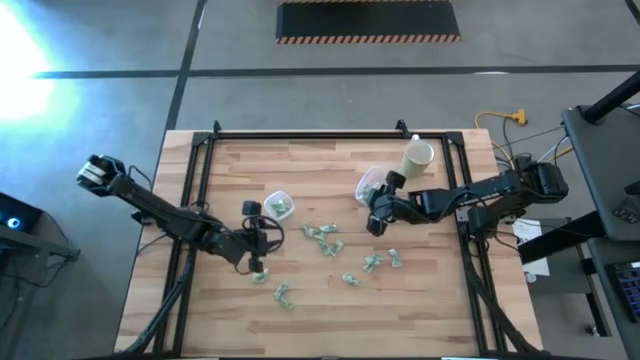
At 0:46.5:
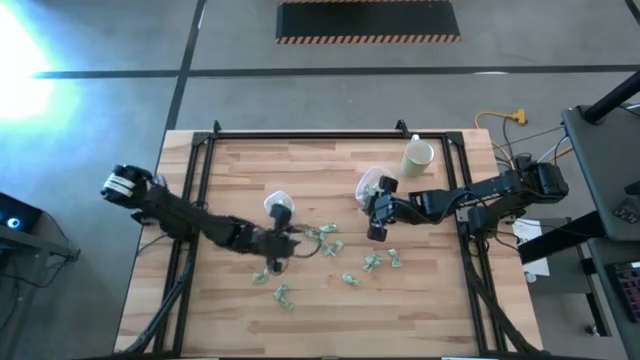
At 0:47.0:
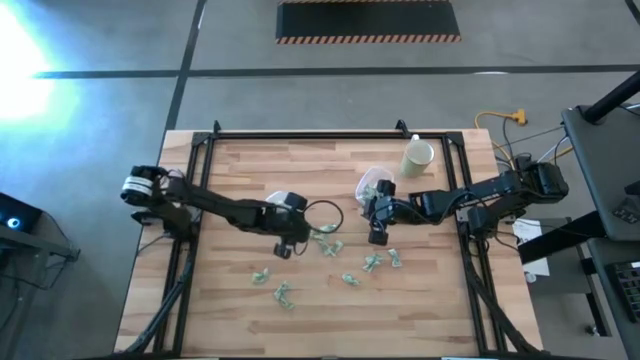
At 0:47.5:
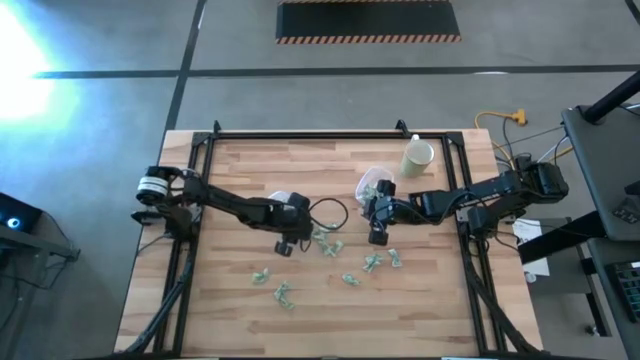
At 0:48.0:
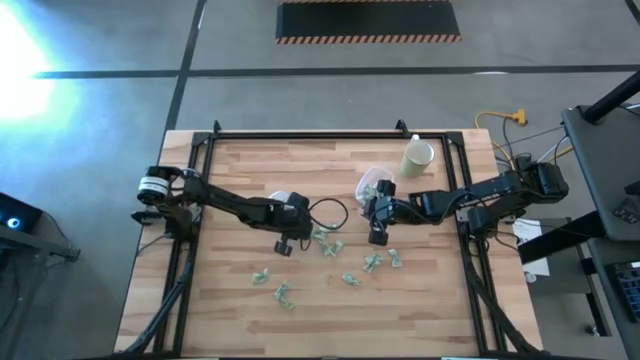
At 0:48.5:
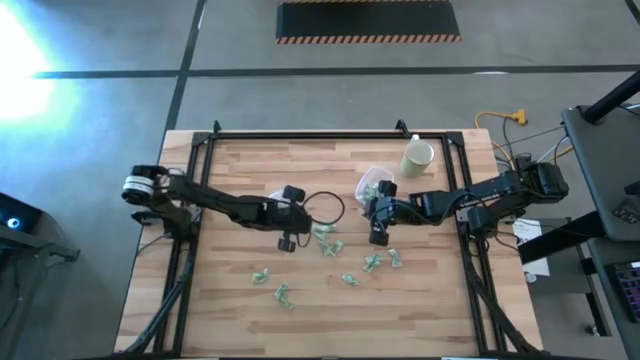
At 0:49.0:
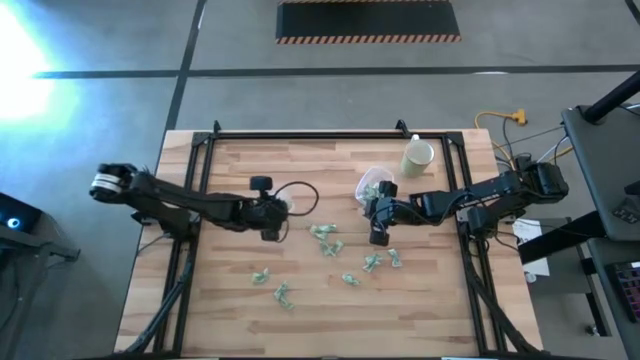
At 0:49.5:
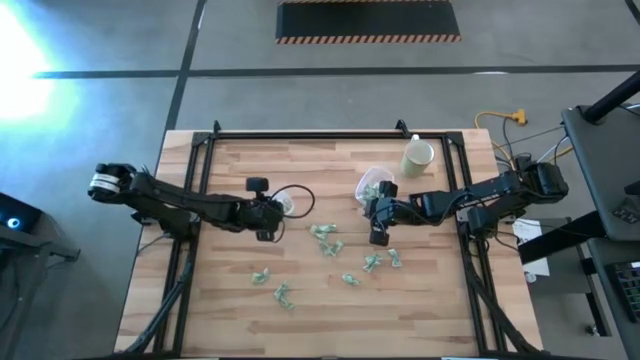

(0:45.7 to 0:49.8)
Task: Pick and place items into bin
Put the stevia packet into the left transparent bin

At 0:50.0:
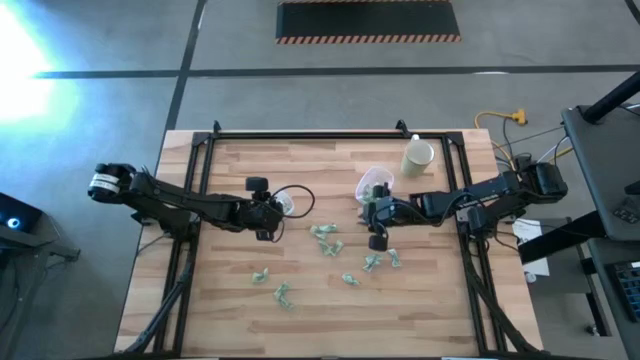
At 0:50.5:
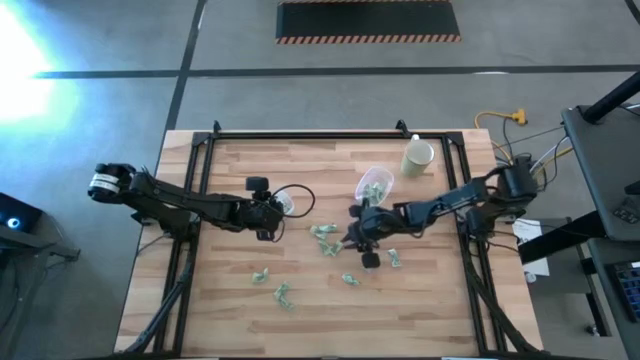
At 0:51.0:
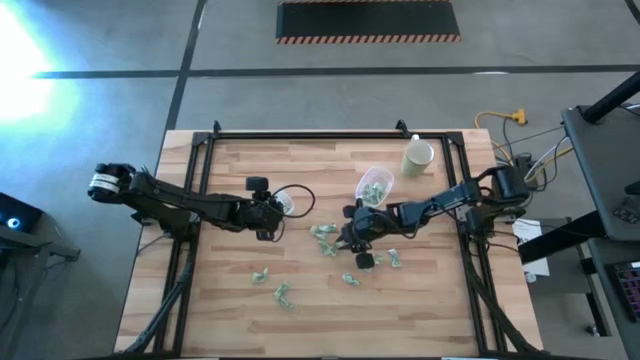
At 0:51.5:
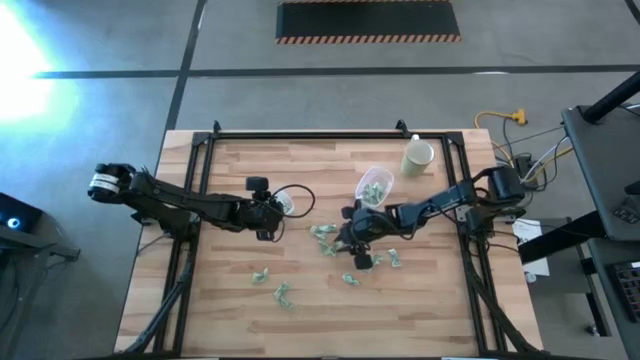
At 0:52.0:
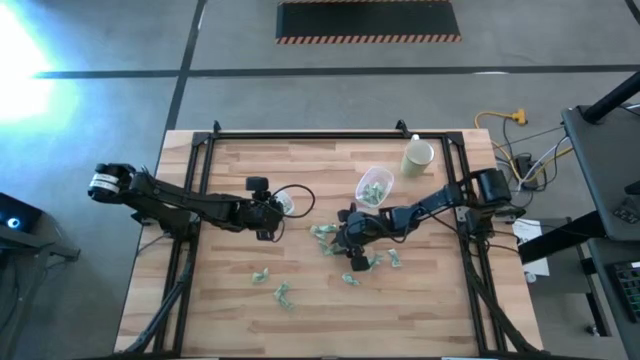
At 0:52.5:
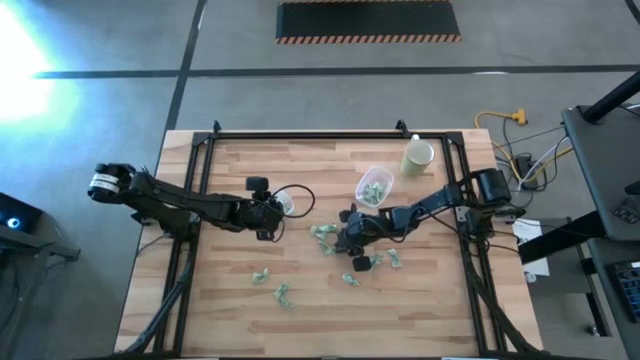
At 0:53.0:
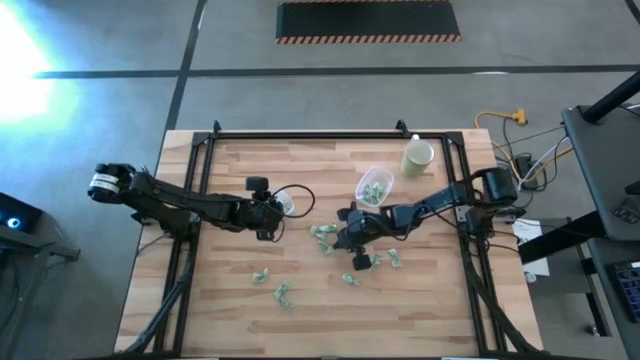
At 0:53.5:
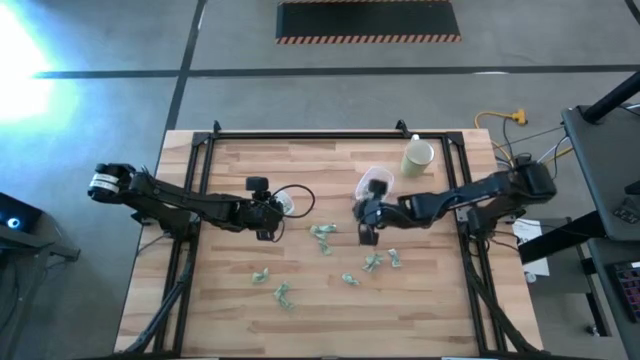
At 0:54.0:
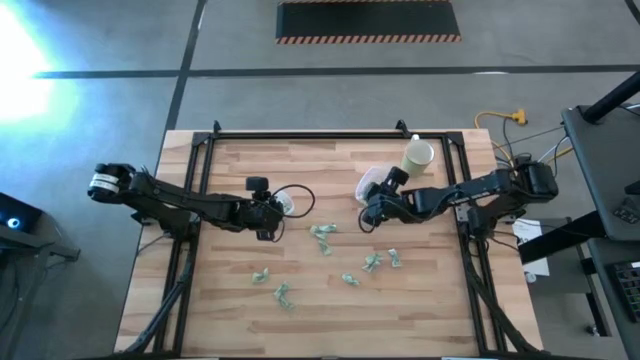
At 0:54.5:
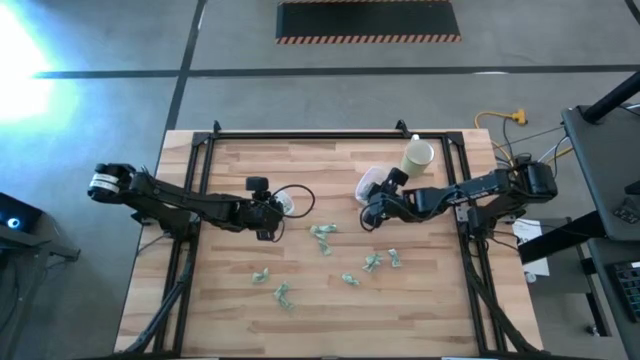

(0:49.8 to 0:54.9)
Put the stevia packet into the right transparent bin

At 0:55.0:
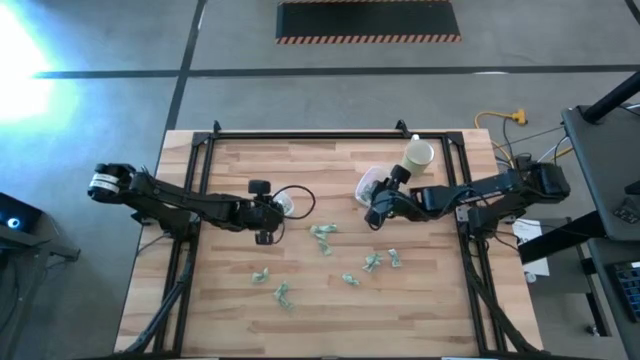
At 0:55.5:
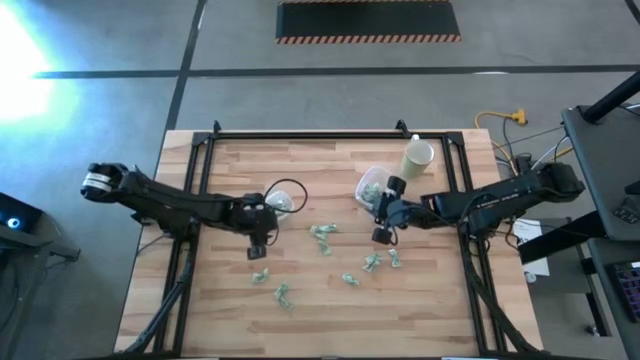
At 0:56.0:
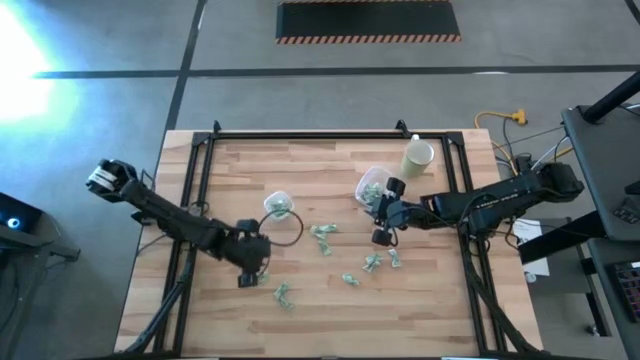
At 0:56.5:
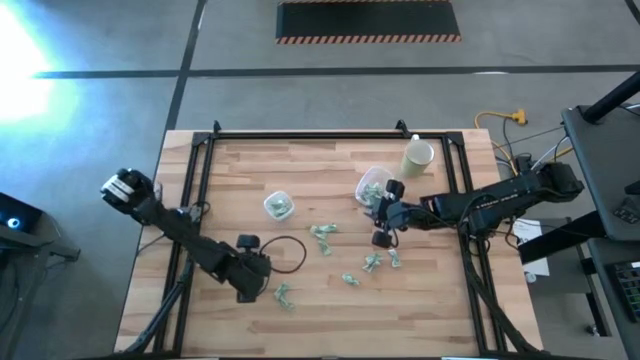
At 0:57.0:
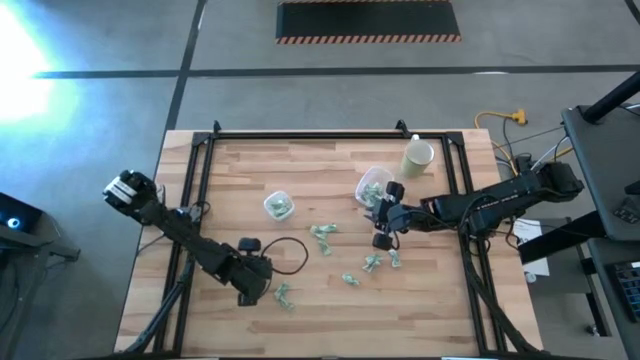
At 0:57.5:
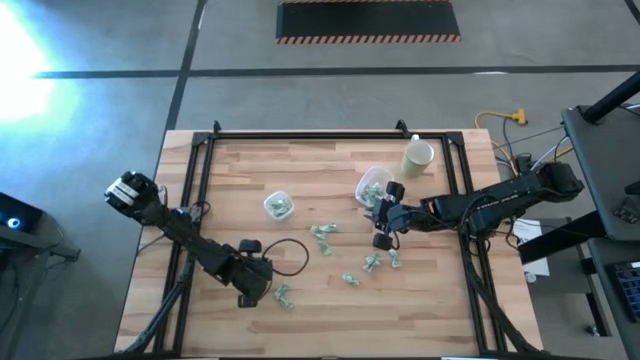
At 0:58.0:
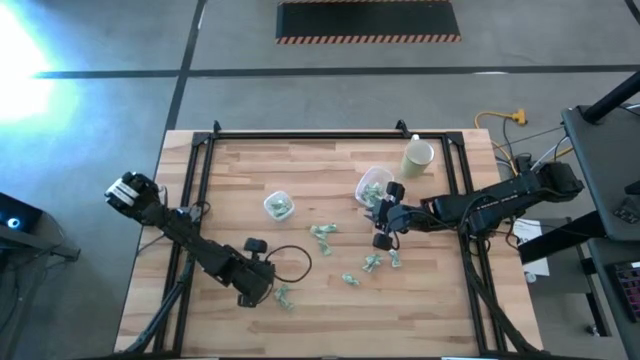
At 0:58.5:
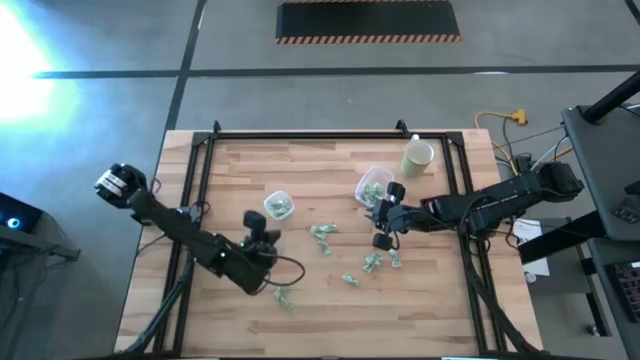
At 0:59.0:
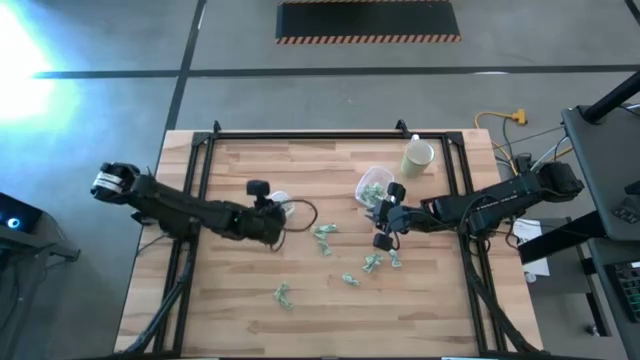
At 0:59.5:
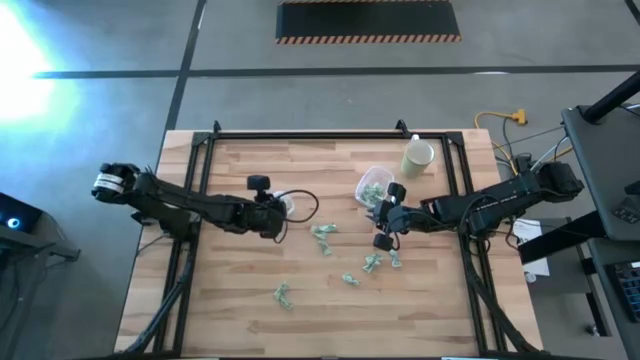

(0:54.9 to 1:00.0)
Put the stevia packet into the left transparent bin

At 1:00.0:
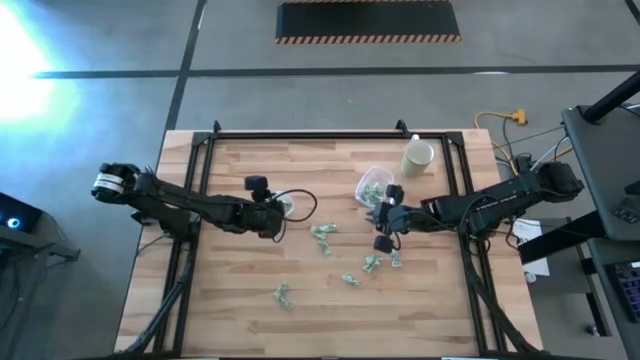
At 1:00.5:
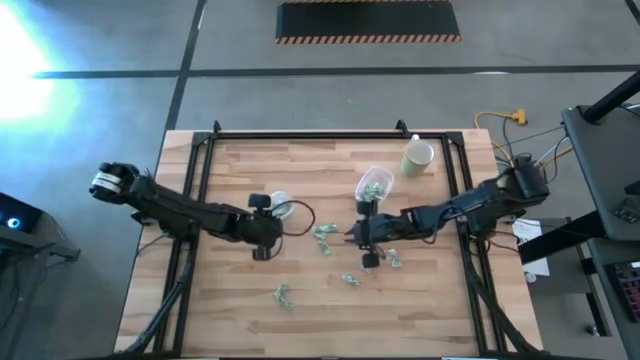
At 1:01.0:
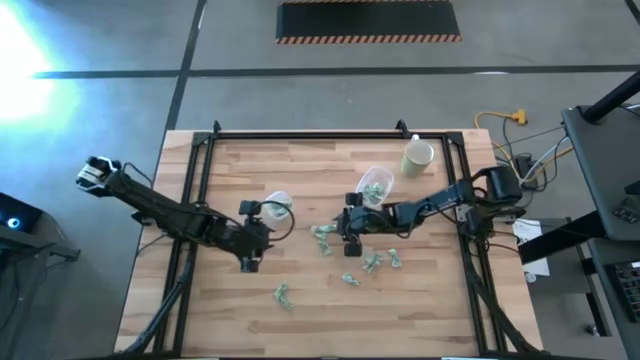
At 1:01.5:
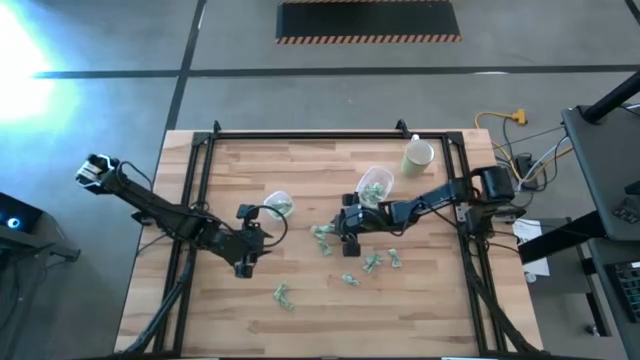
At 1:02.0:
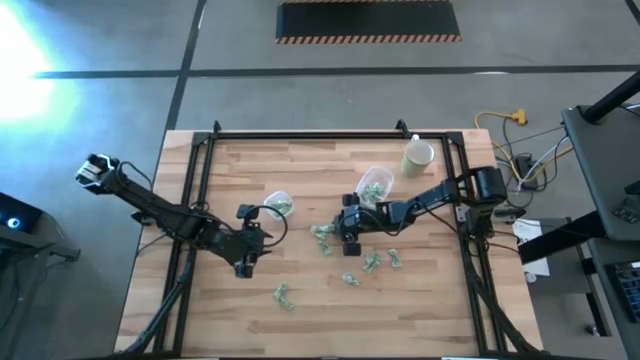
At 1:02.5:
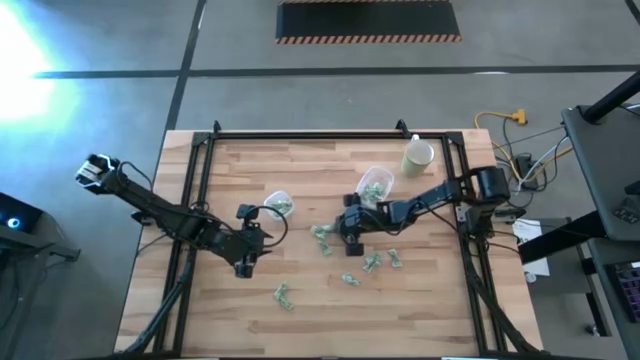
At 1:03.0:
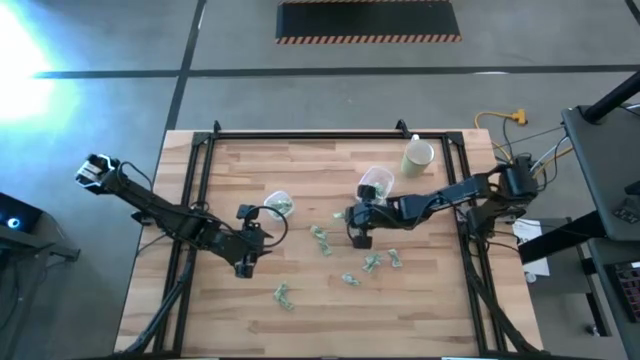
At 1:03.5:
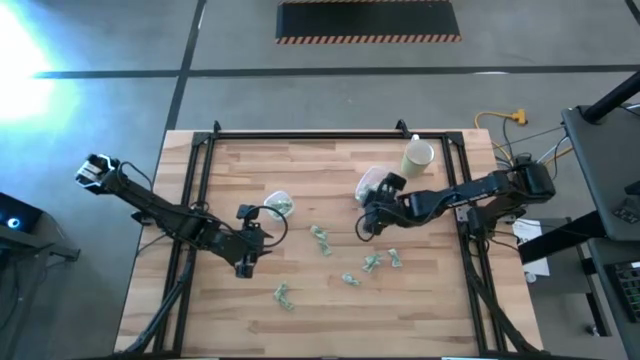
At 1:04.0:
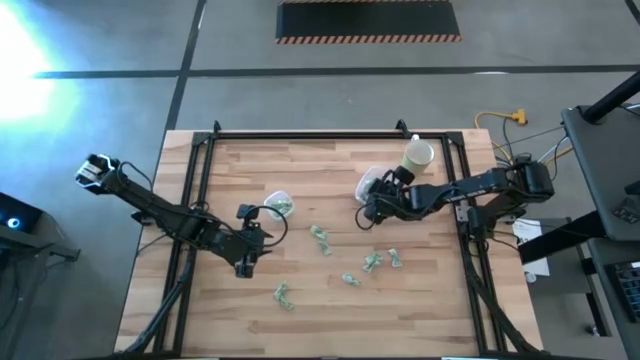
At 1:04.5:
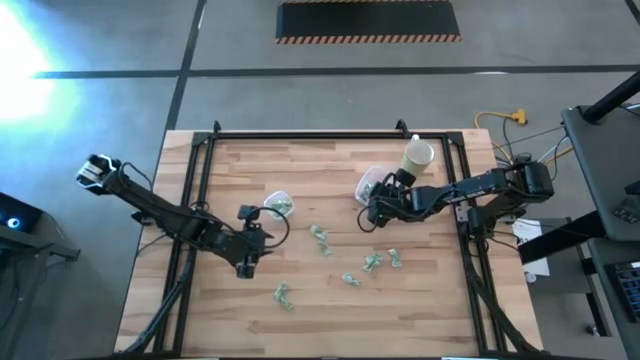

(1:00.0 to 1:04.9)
Put the stevia packet into the right transparent bin

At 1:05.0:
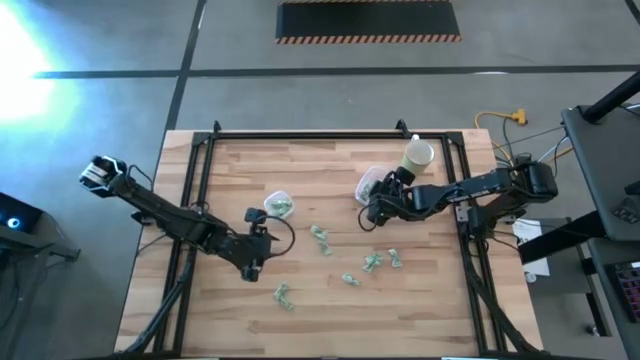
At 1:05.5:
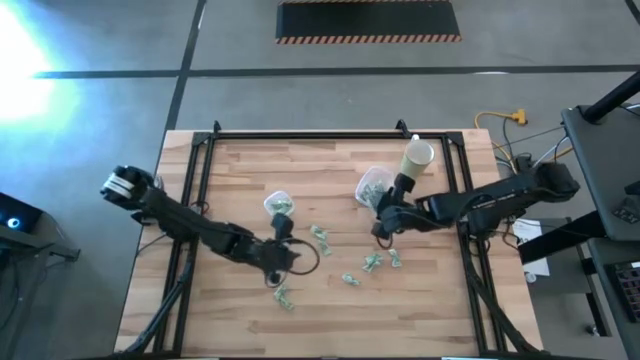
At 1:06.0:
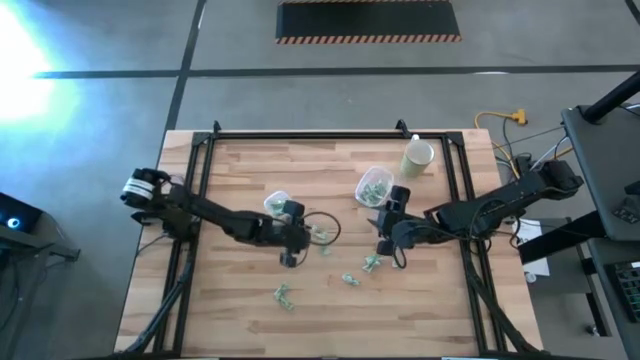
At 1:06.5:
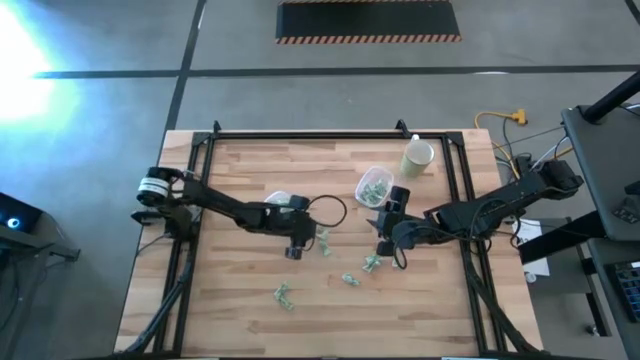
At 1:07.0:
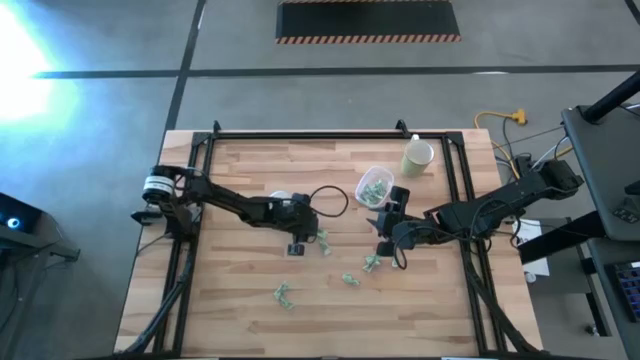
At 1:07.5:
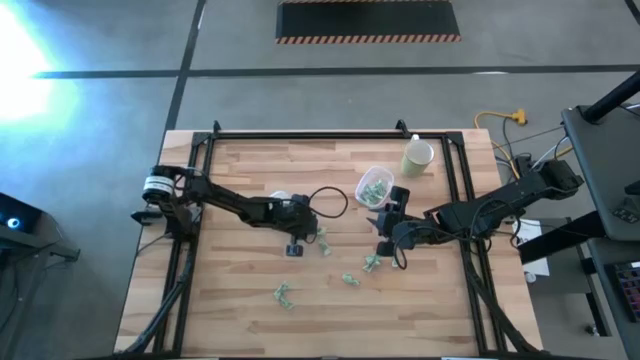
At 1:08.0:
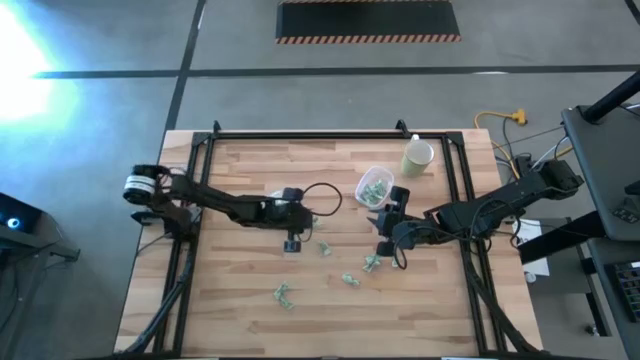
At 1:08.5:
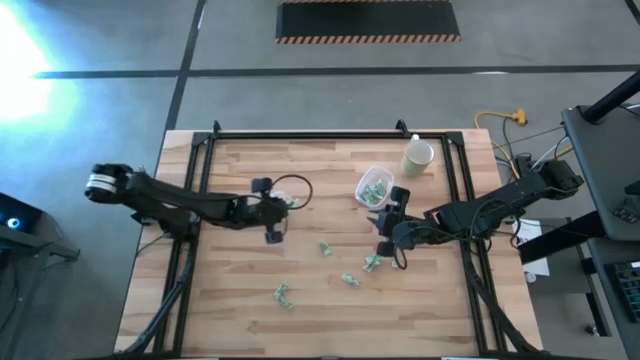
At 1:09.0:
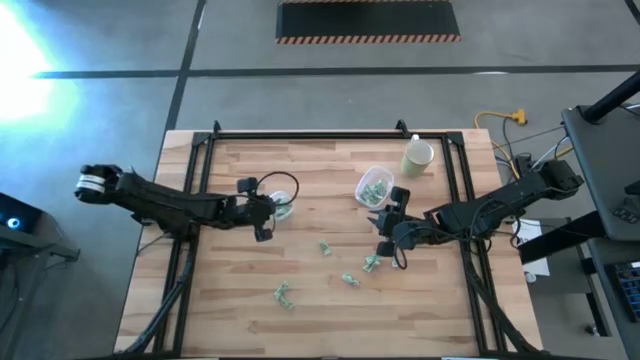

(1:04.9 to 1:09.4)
Put the stevia packet into the left transparent bin
